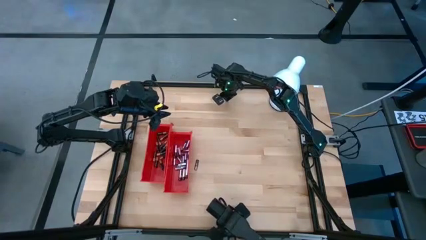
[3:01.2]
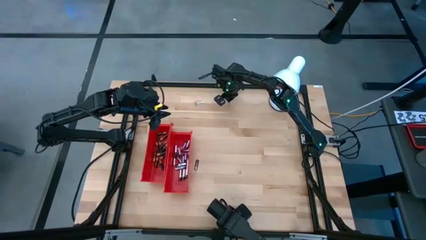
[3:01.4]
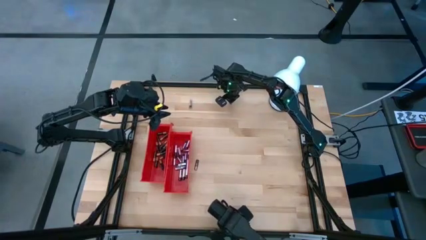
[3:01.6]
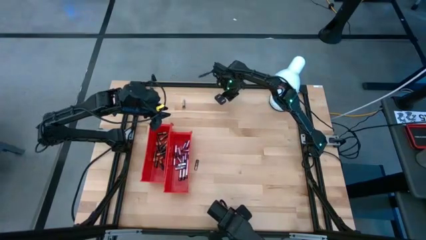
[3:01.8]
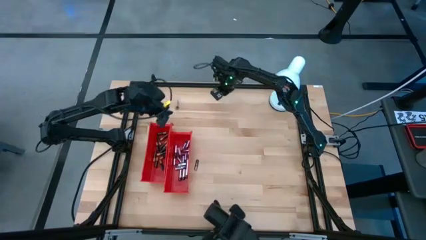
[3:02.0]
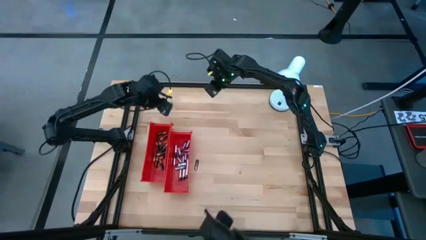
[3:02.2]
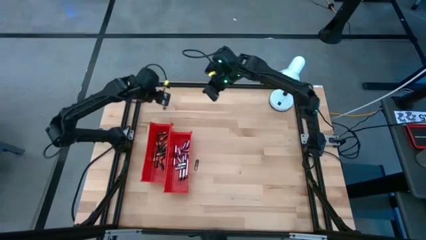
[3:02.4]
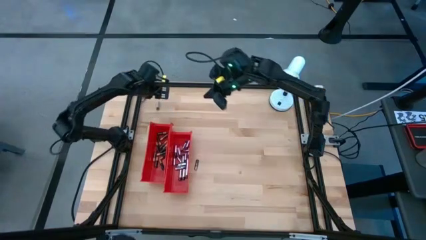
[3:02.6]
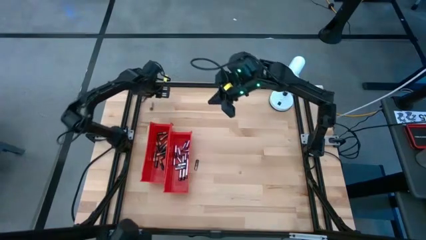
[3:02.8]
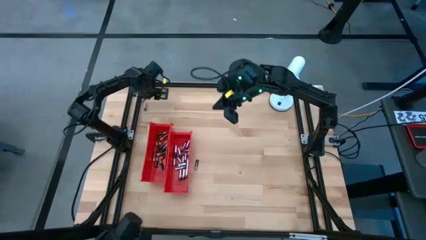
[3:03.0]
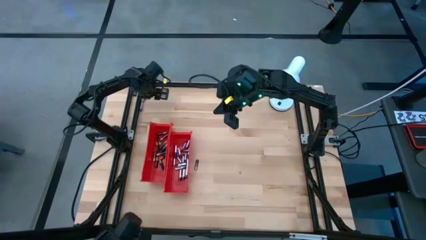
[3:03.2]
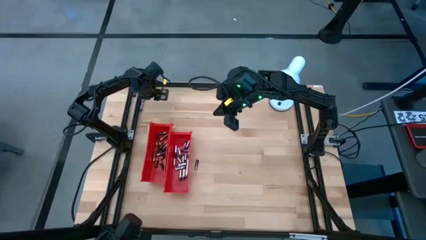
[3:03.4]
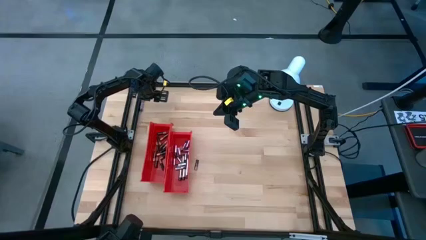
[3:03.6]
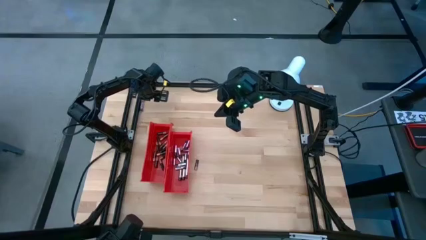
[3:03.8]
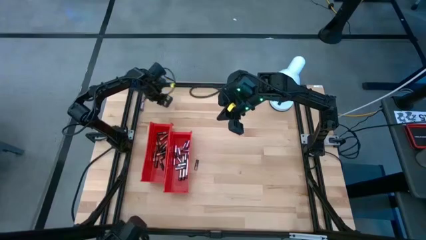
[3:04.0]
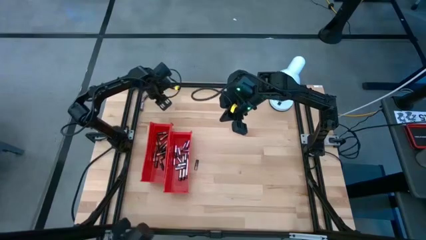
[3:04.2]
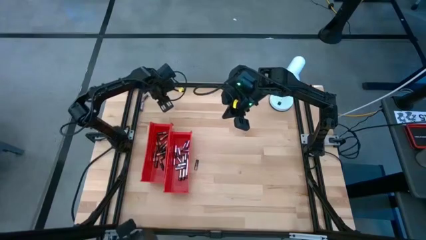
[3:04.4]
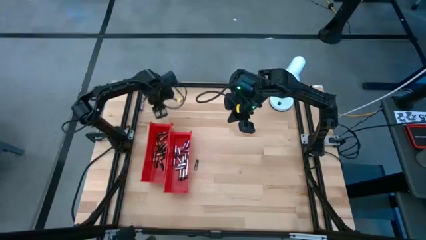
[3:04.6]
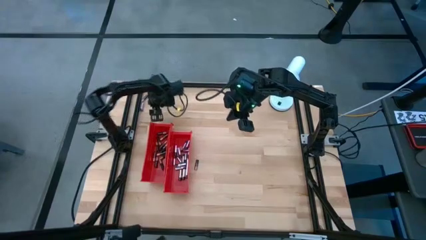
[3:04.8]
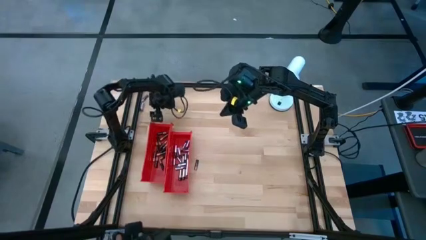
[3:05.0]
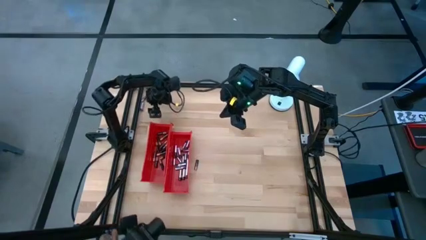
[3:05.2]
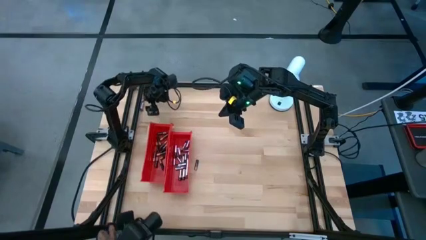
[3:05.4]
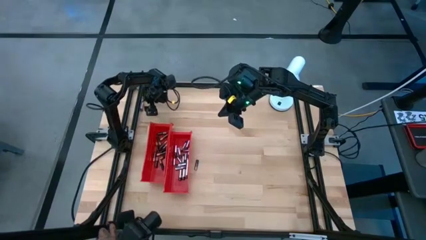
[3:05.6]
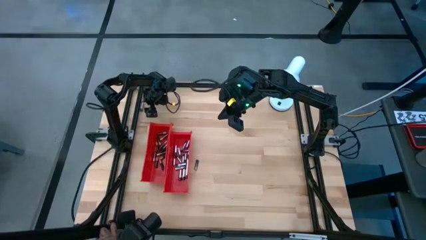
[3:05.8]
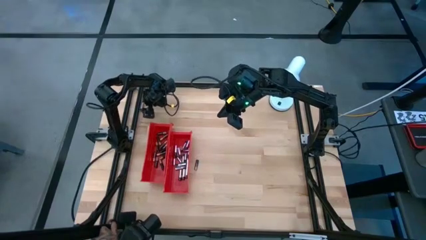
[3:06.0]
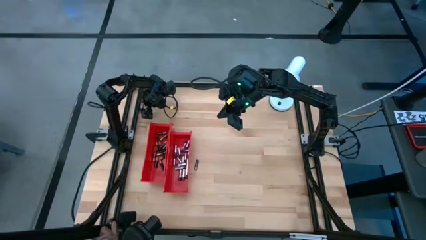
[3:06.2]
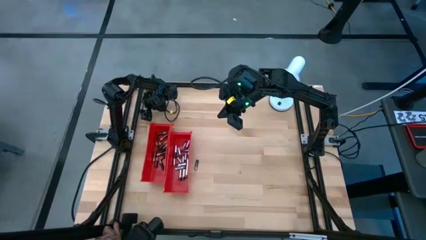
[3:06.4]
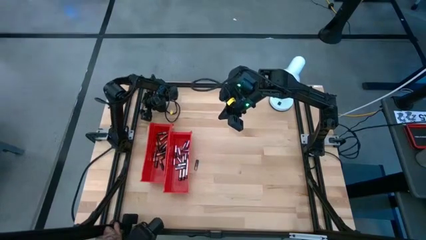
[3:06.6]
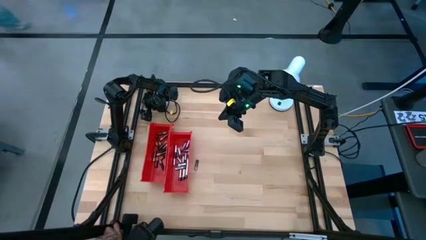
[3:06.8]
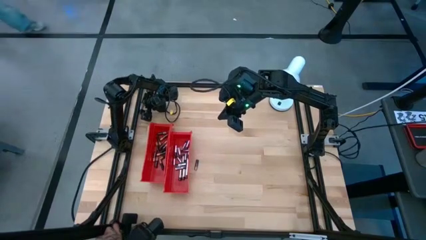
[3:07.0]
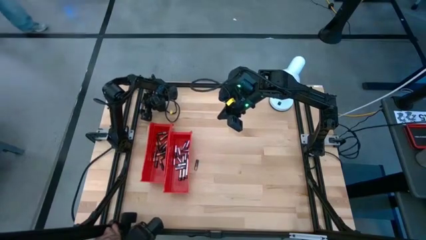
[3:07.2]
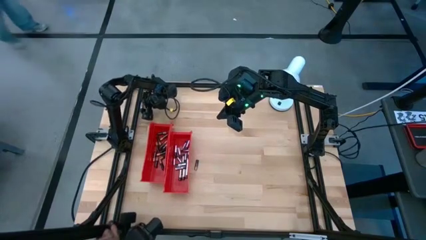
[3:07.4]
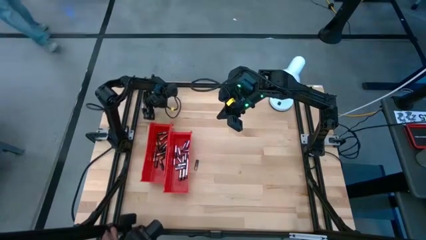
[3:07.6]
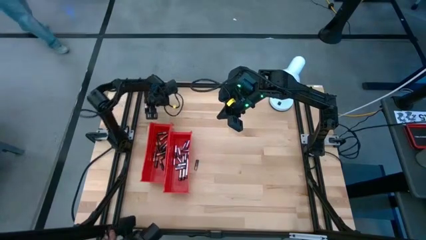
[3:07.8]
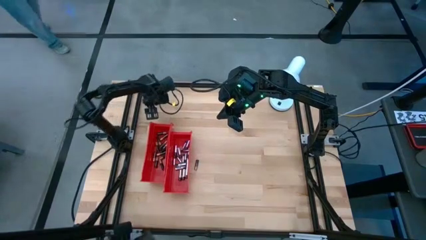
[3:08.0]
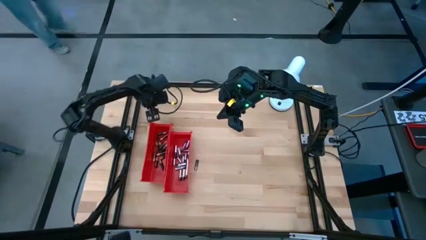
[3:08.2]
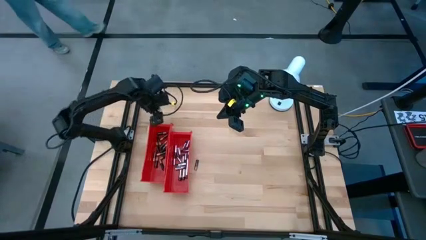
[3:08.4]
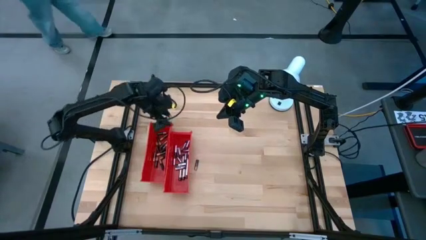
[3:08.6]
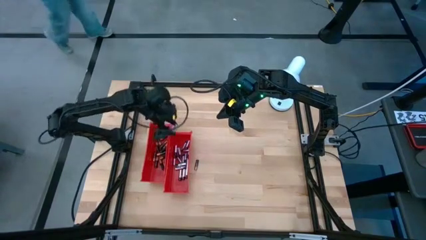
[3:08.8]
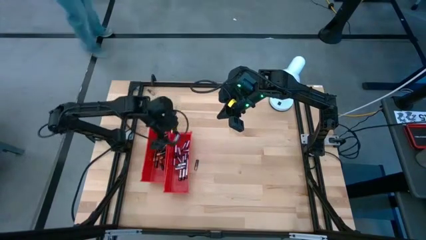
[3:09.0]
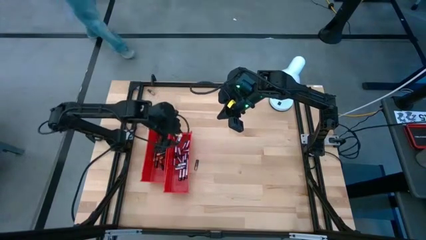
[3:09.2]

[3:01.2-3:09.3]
Task: Sort batteries
Put the silver battery into the right red bin

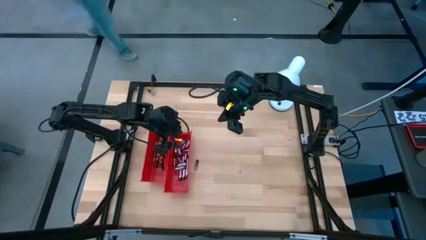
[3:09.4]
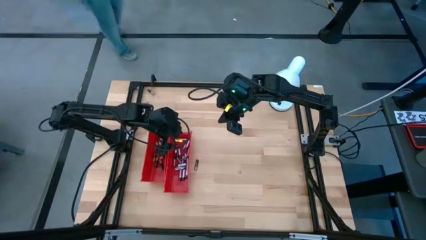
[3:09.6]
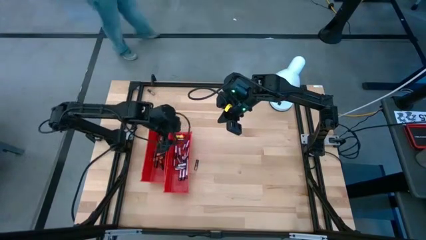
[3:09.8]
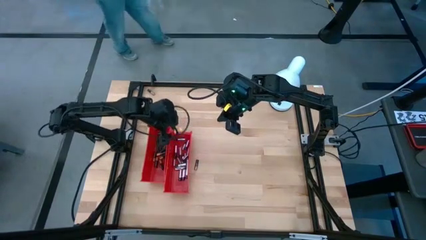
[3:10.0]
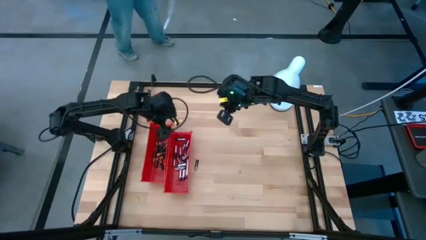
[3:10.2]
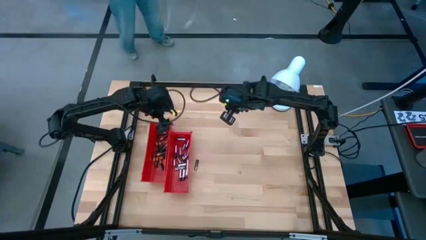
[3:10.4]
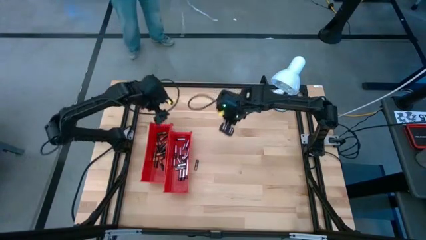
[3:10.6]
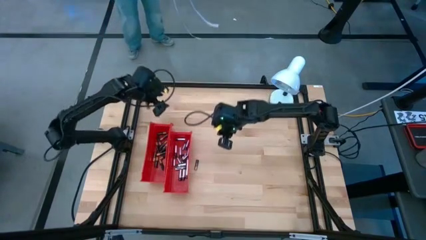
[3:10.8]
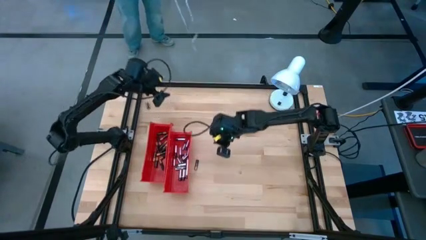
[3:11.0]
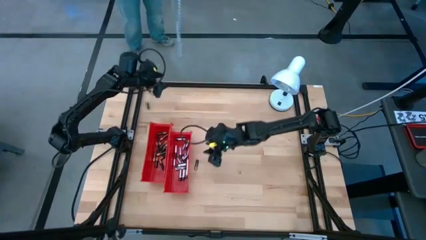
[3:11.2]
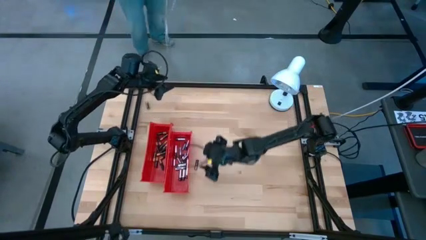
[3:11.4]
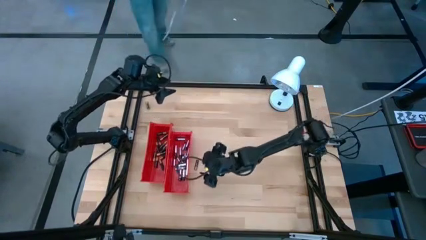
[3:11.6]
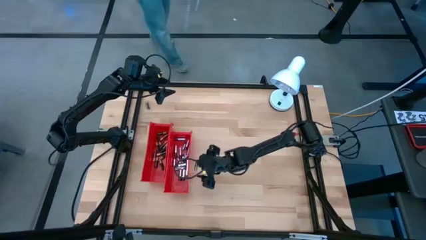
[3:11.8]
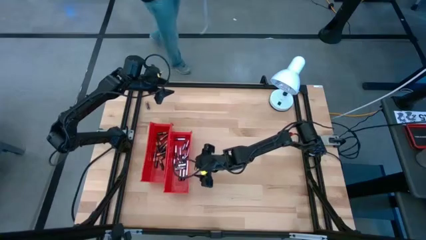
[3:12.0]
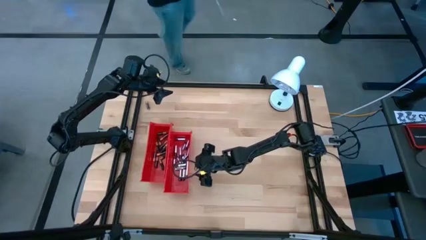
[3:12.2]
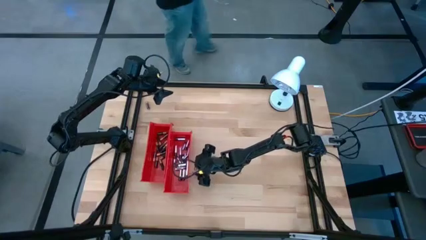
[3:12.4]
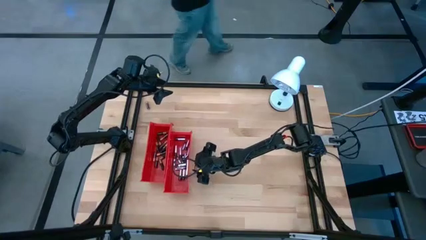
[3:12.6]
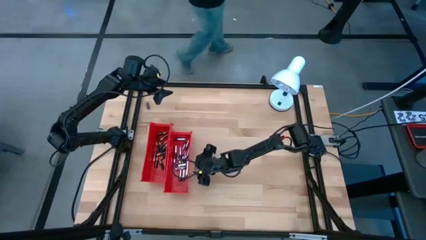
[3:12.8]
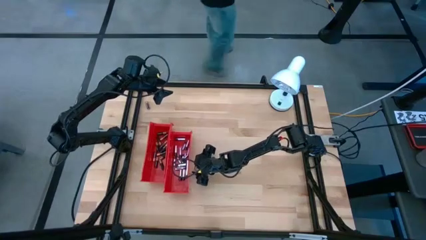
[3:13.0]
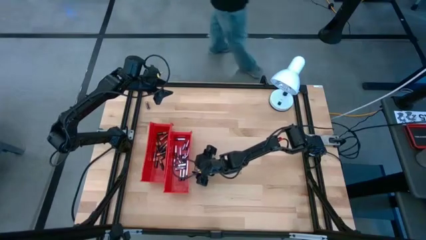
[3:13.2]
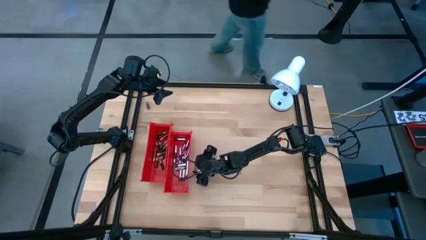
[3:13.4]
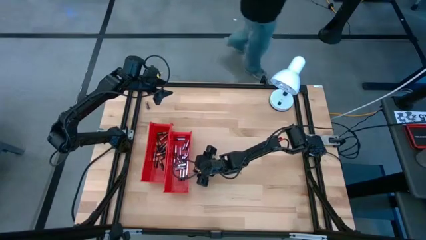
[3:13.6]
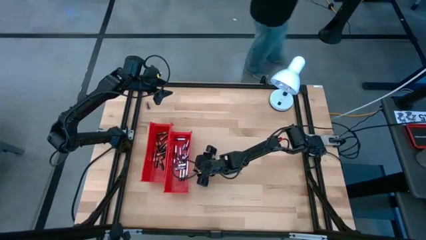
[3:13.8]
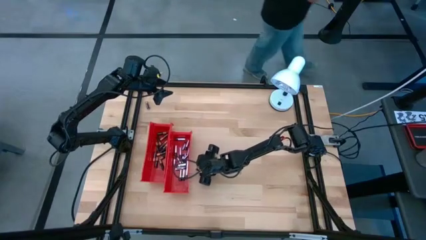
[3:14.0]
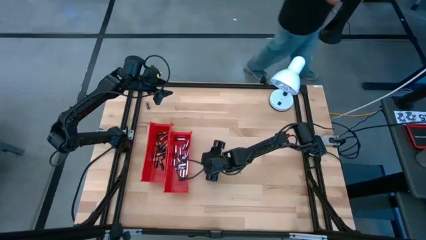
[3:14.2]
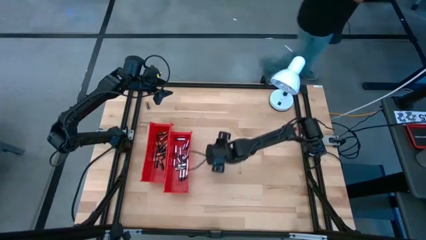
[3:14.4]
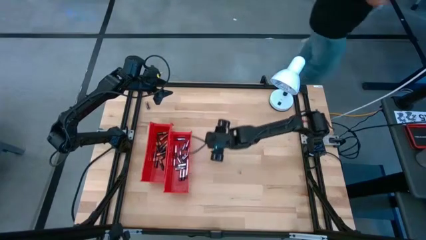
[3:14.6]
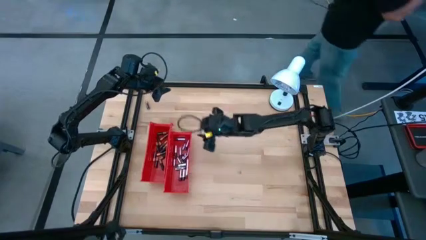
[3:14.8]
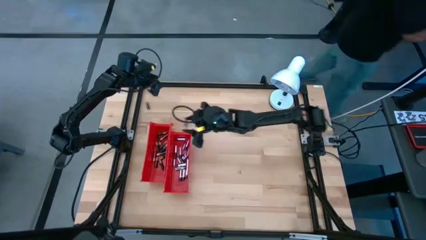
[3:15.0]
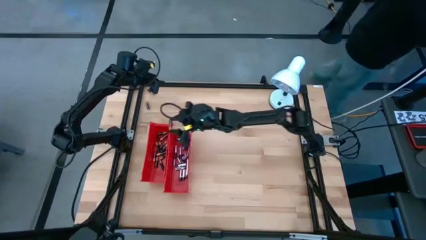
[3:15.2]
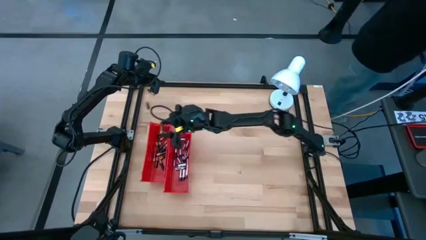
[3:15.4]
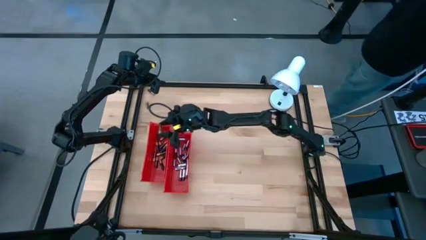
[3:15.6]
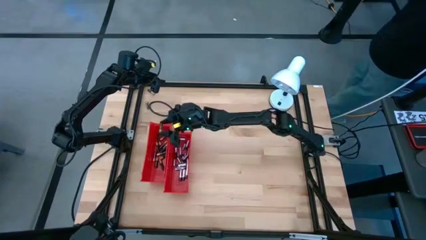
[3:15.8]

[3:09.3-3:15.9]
Put the black battery into the left red bin
